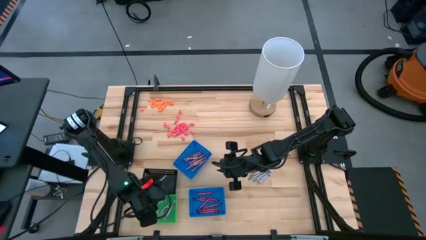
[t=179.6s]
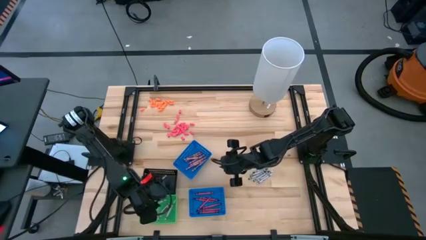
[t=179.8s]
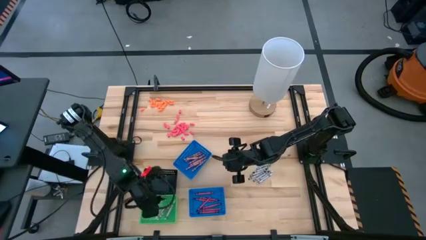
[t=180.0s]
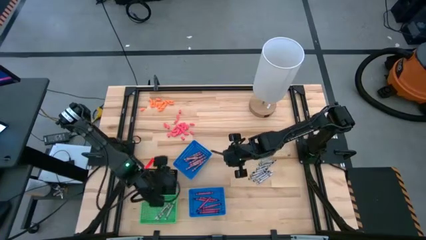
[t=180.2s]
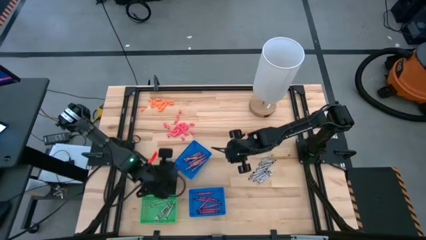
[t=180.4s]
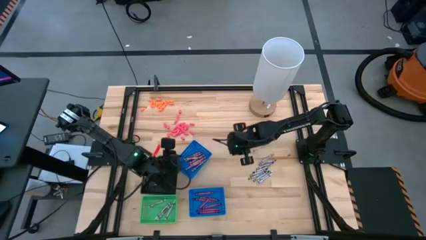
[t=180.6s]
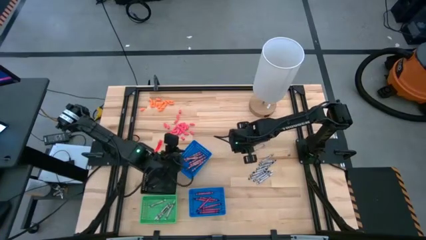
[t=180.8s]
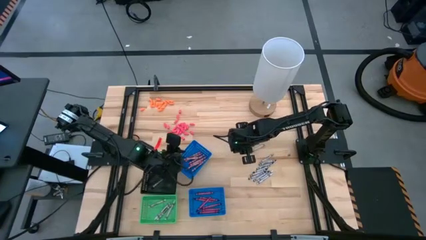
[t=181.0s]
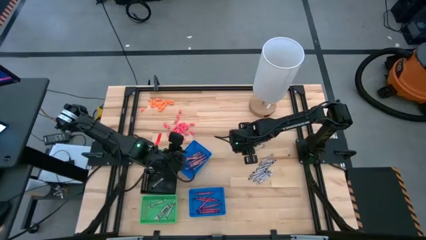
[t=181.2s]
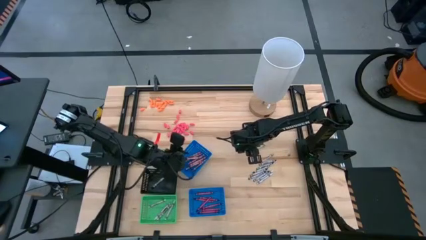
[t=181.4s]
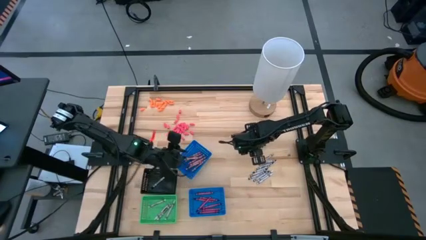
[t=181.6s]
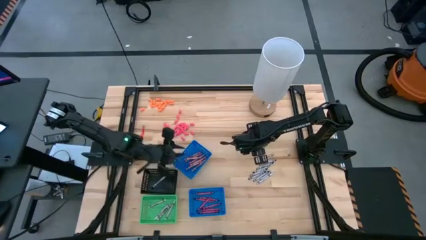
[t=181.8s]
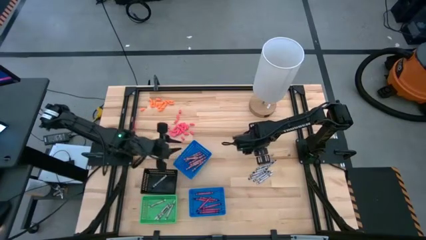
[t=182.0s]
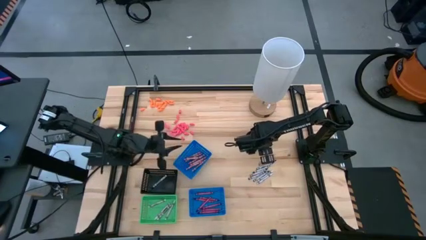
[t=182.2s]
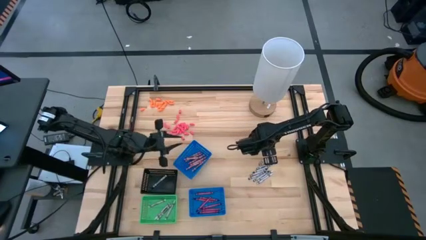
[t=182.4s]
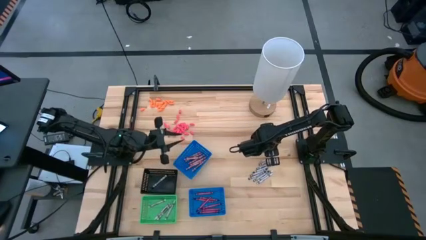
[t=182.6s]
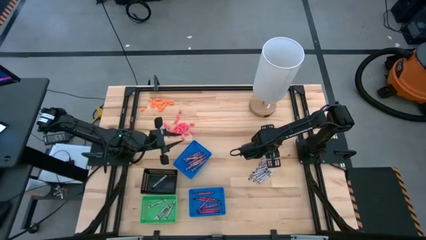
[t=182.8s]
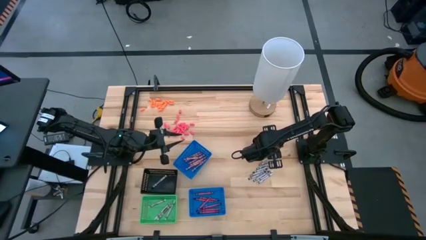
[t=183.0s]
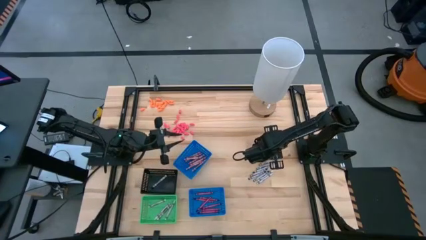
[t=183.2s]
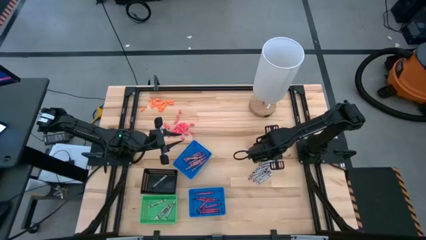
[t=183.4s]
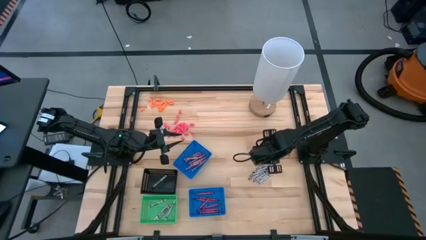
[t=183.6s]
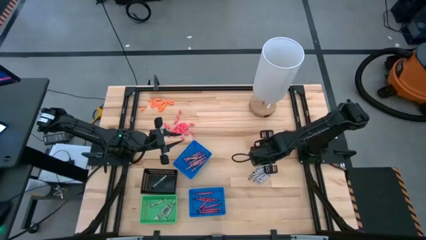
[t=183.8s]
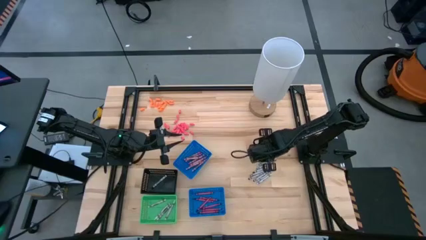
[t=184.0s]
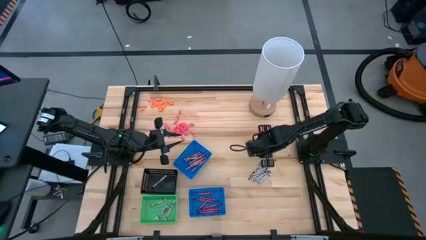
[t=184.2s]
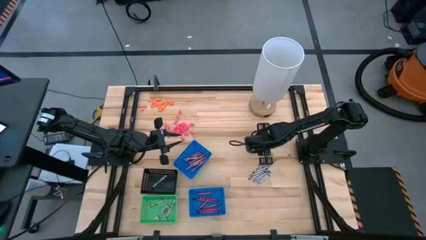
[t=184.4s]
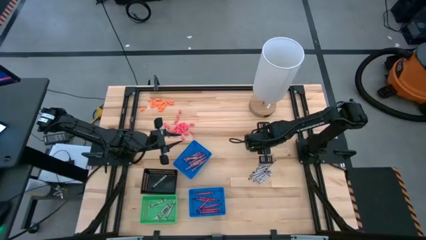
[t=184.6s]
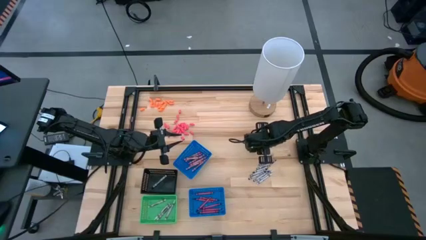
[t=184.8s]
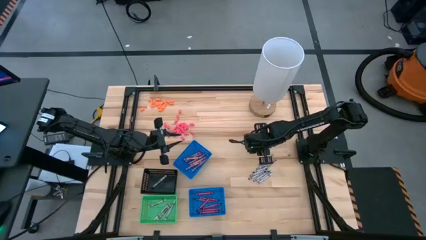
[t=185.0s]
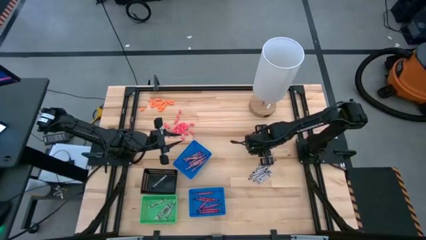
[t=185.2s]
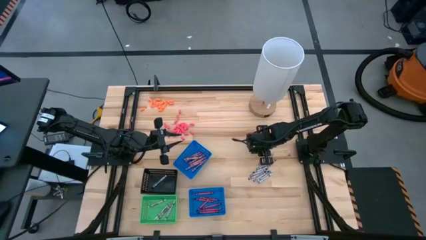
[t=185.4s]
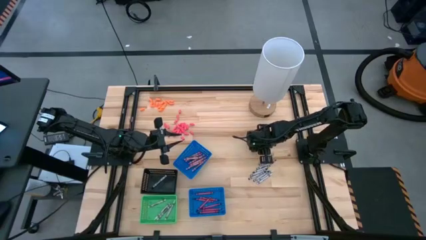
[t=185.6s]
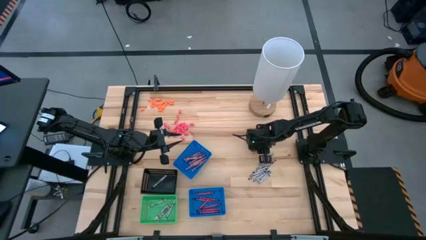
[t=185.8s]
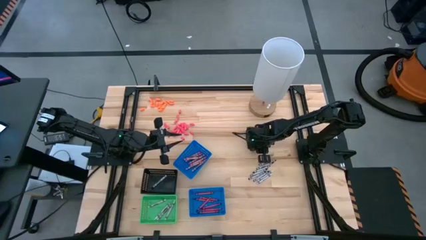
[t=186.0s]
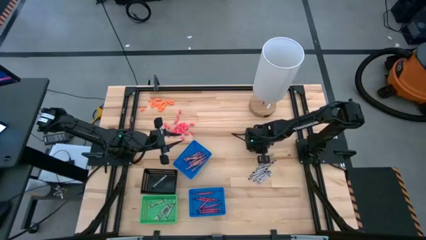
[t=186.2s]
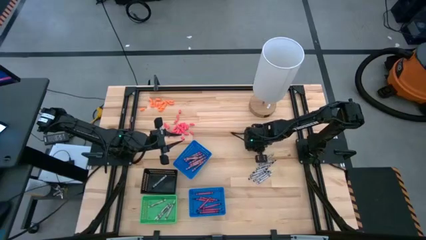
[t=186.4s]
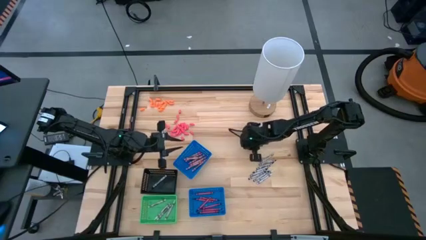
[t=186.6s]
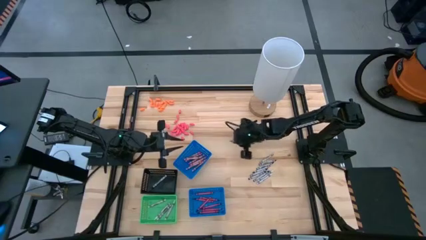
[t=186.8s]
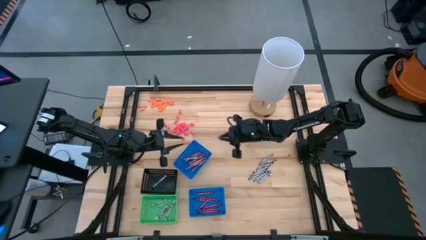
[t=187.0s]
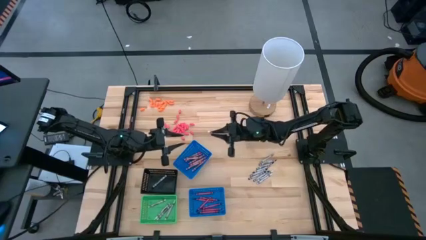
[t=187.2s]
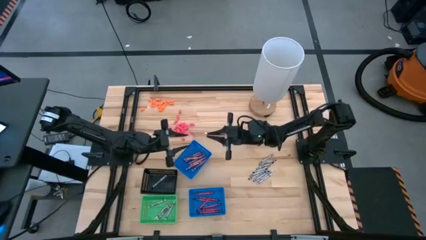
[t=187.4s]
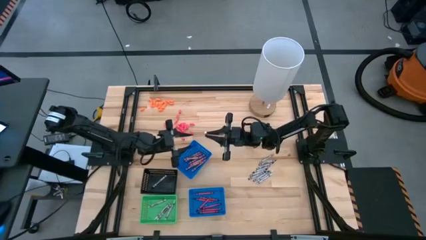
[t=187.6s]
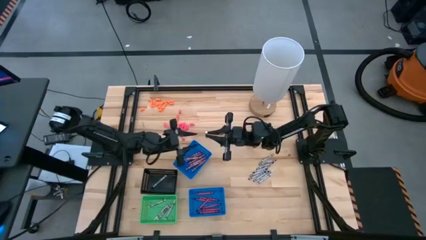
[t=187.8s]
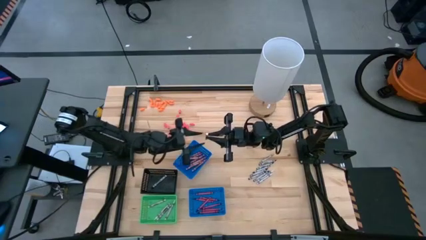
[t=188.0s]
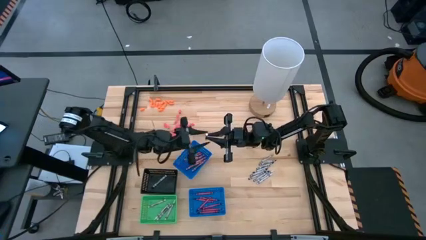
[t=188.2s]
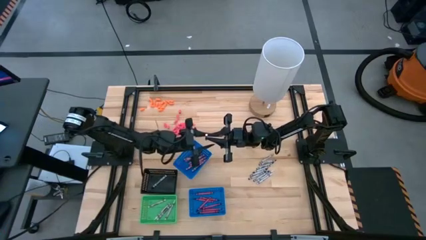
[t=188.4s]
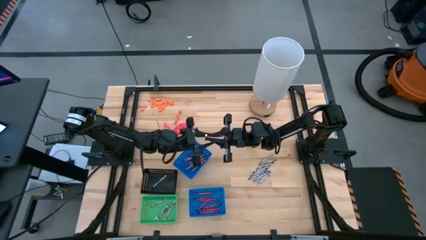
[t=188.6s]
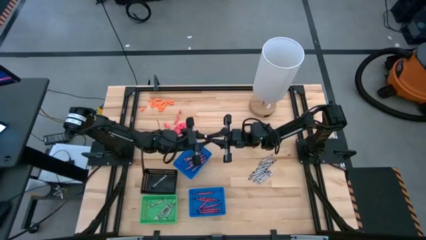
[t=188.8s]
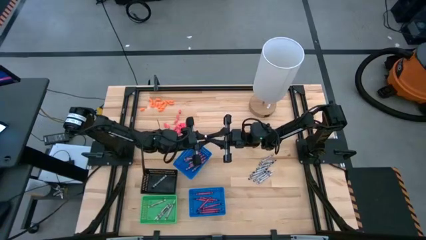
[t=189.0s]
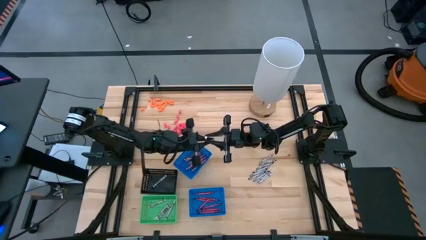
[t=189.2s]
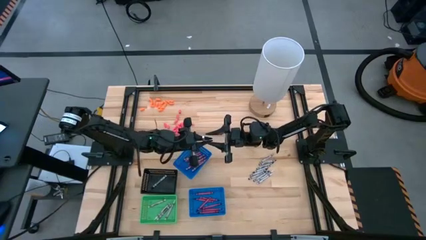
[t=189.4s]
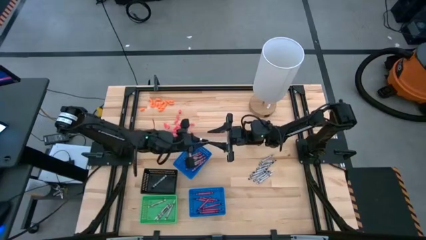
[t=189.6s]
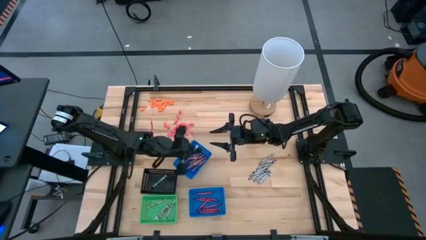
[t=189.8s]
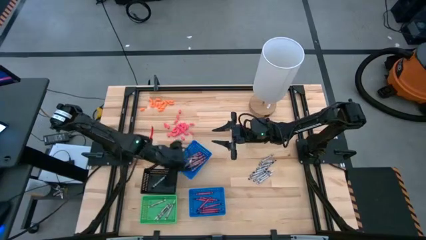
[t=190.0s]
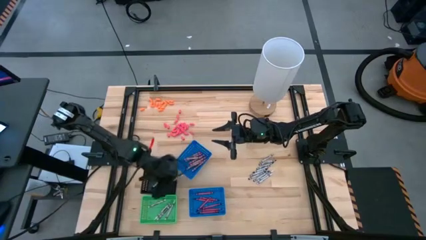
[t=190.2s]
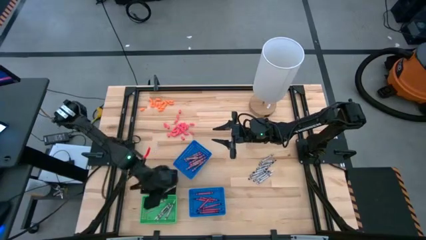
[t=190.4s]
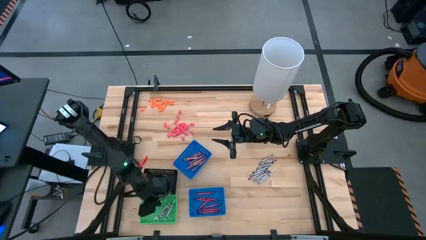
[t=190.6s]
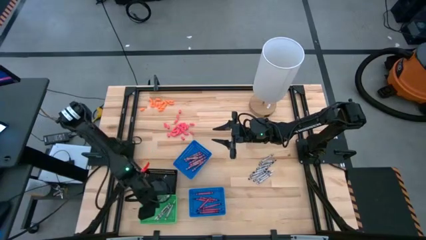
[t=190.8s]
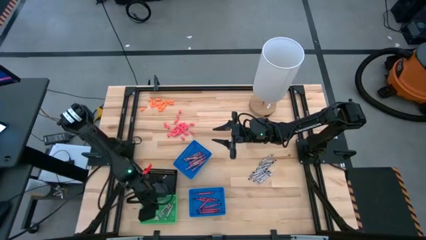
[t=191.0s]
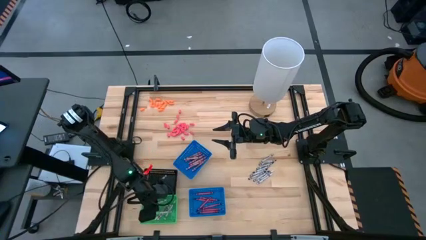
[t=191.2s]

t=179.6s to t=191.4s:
Task: Sort crayons
Put the white crayon into the green bin
